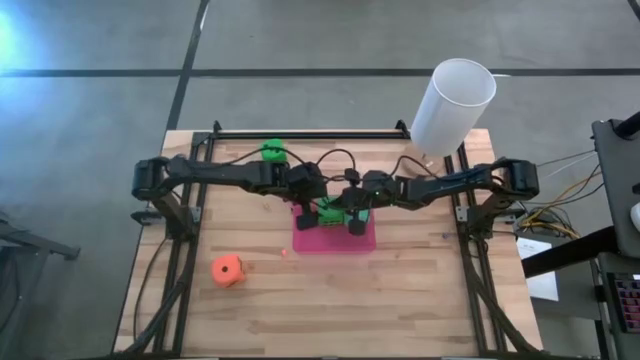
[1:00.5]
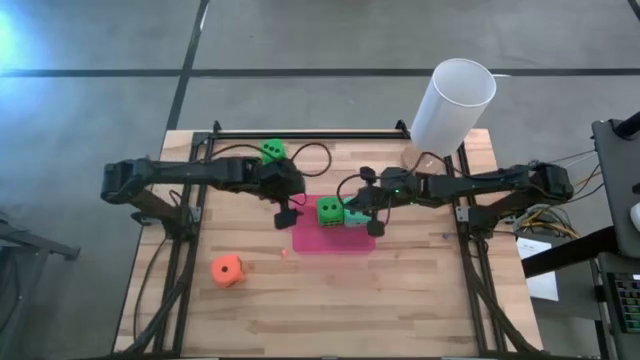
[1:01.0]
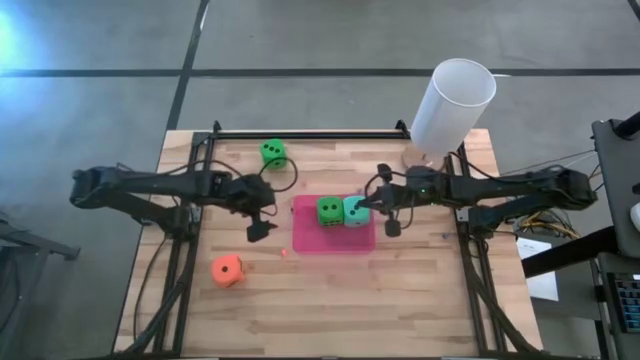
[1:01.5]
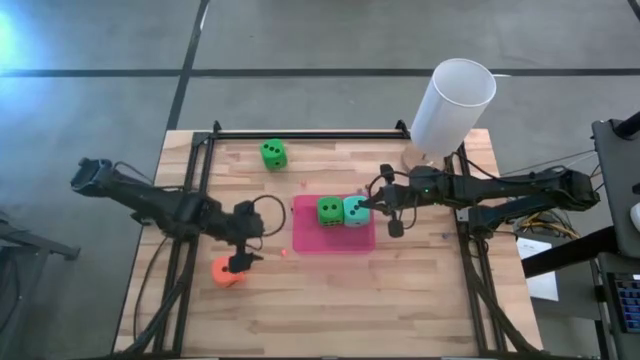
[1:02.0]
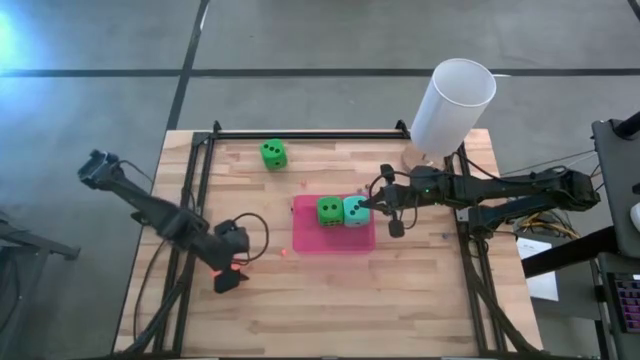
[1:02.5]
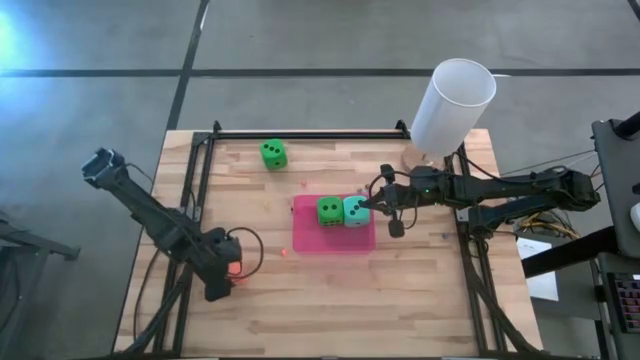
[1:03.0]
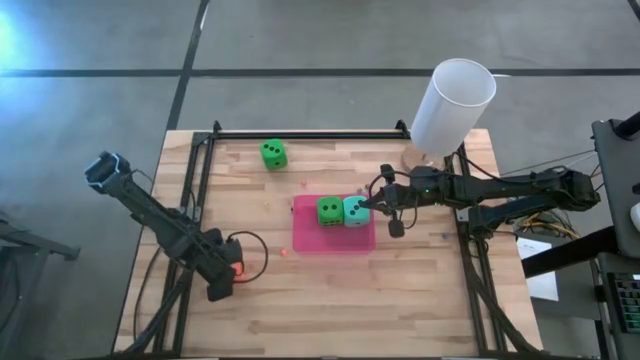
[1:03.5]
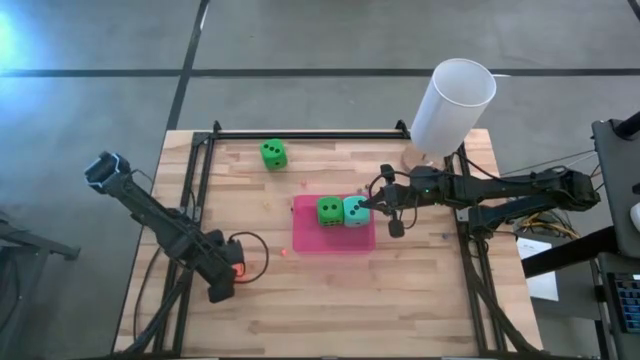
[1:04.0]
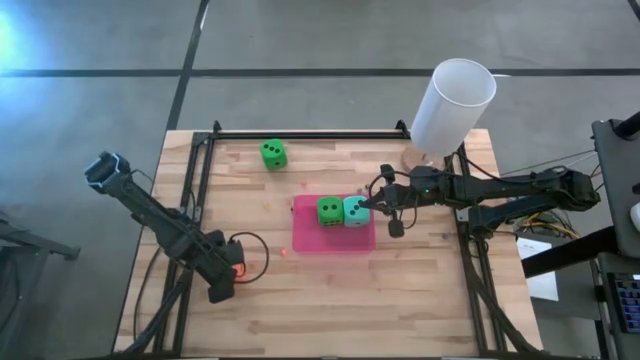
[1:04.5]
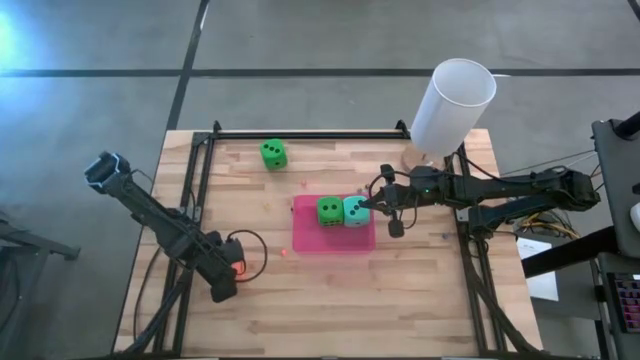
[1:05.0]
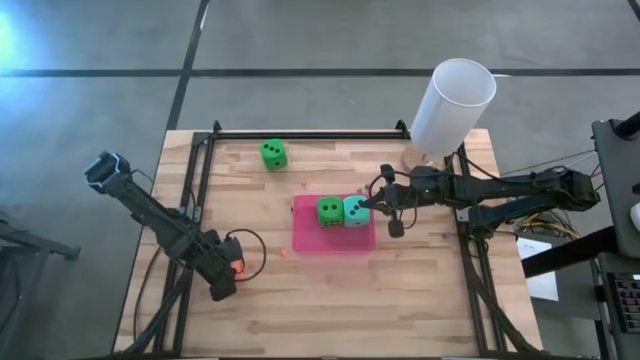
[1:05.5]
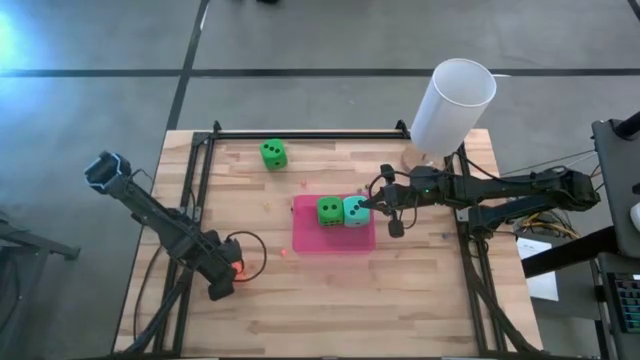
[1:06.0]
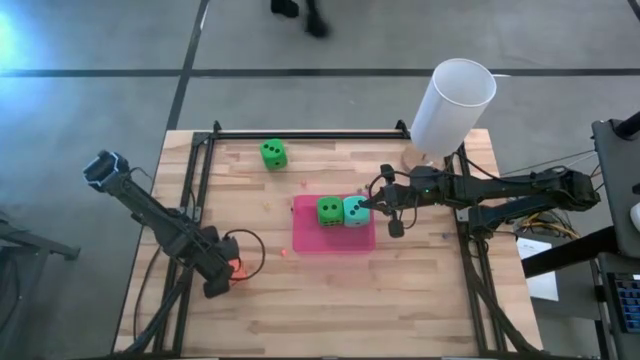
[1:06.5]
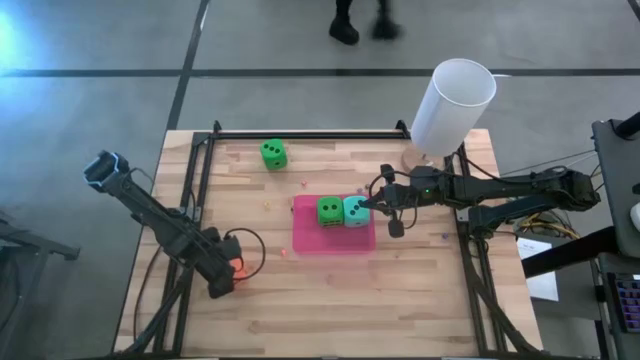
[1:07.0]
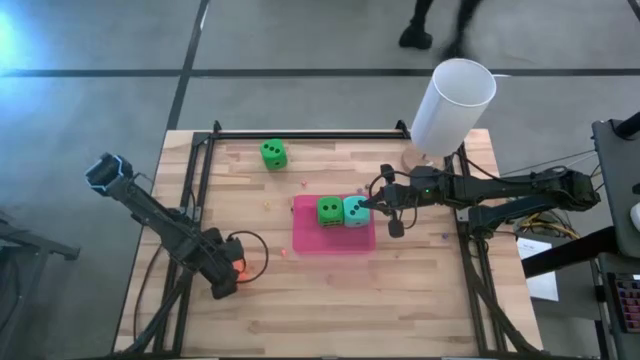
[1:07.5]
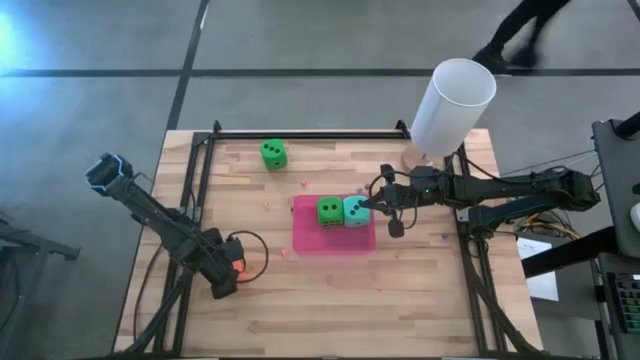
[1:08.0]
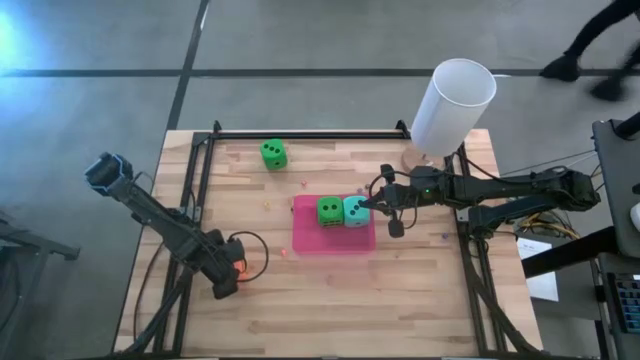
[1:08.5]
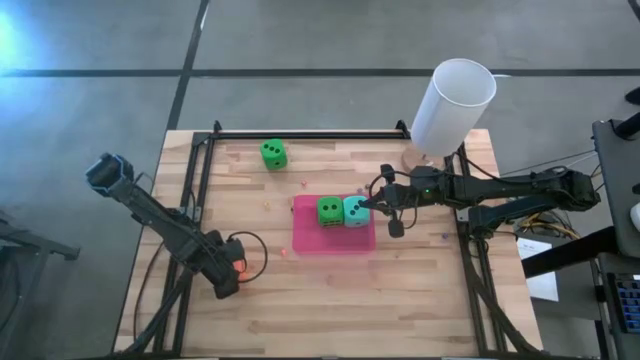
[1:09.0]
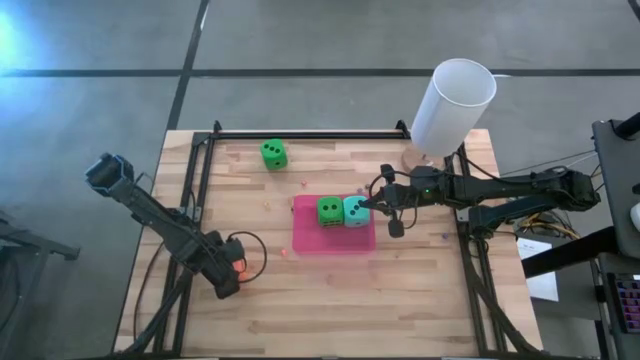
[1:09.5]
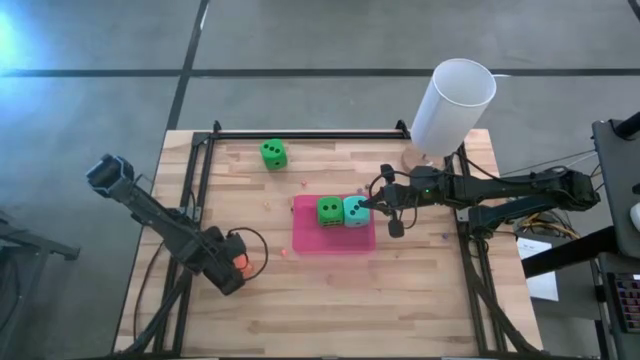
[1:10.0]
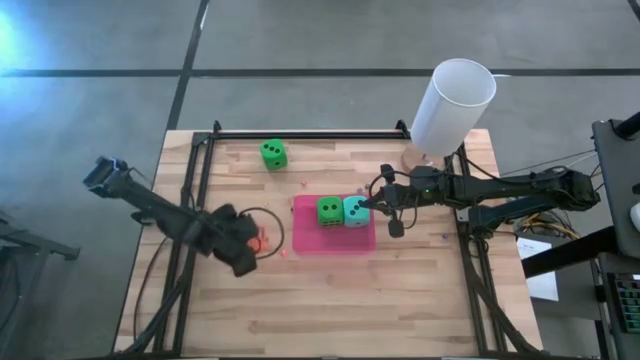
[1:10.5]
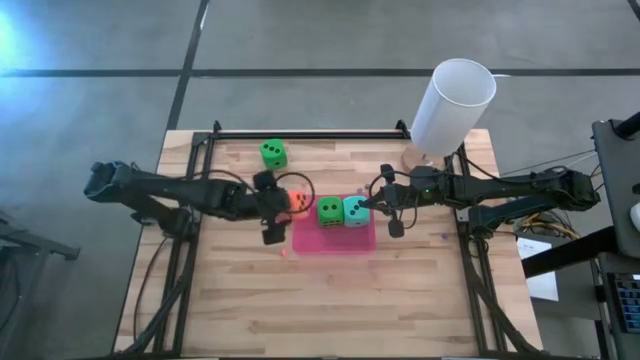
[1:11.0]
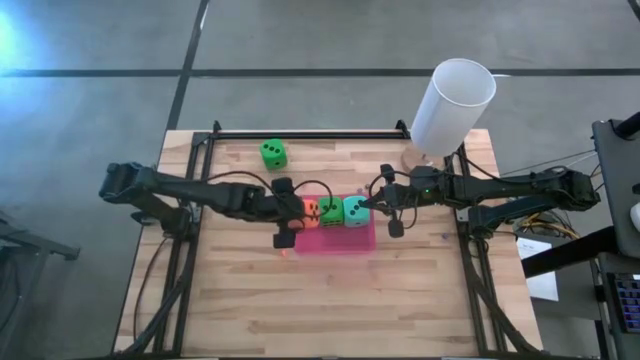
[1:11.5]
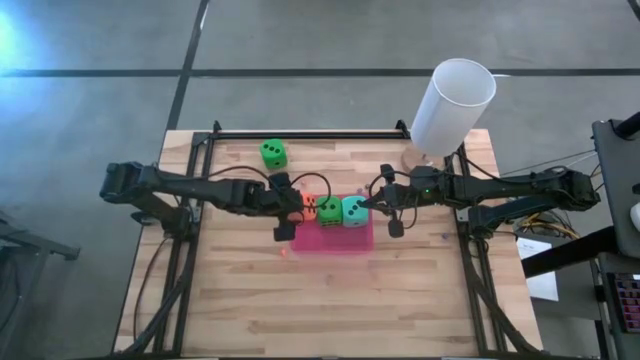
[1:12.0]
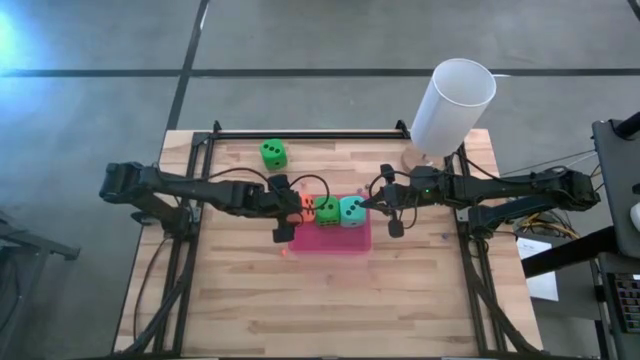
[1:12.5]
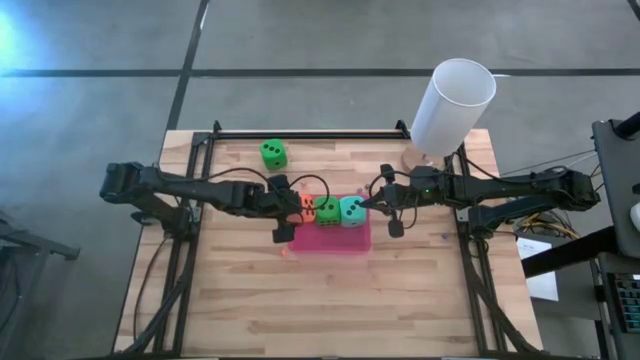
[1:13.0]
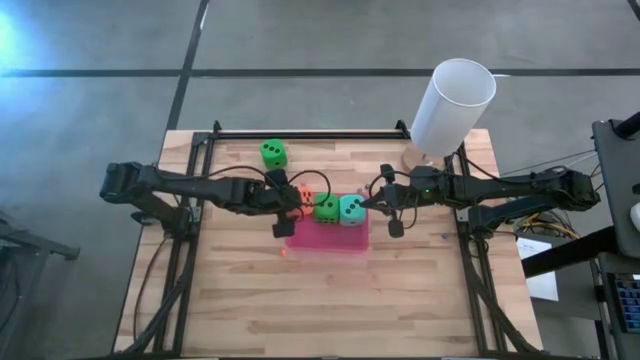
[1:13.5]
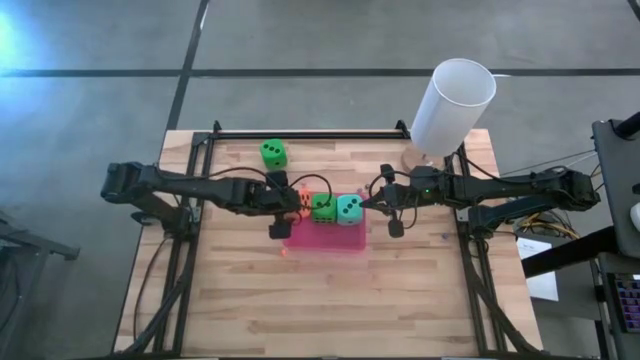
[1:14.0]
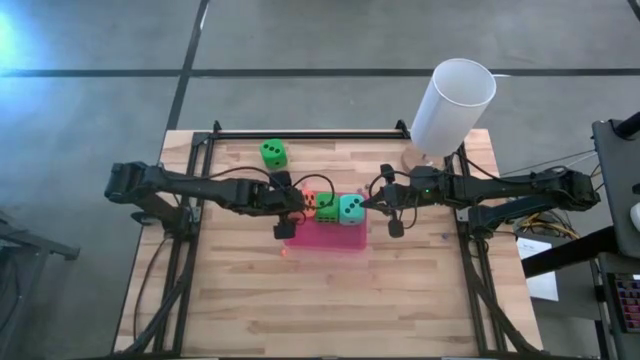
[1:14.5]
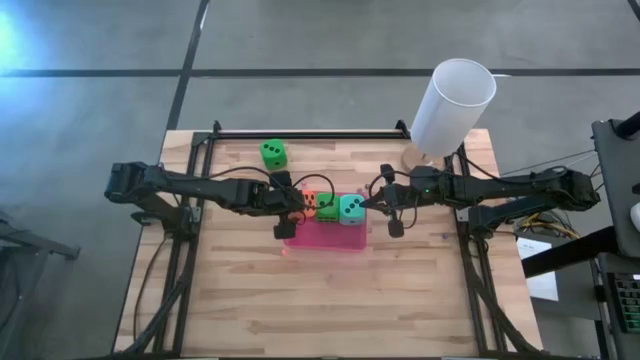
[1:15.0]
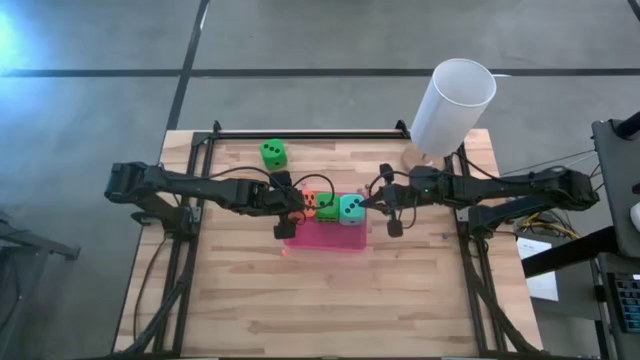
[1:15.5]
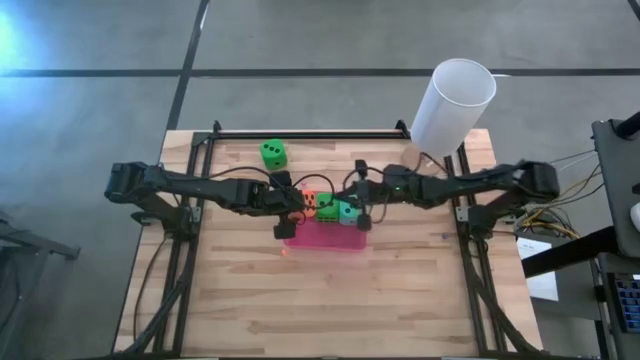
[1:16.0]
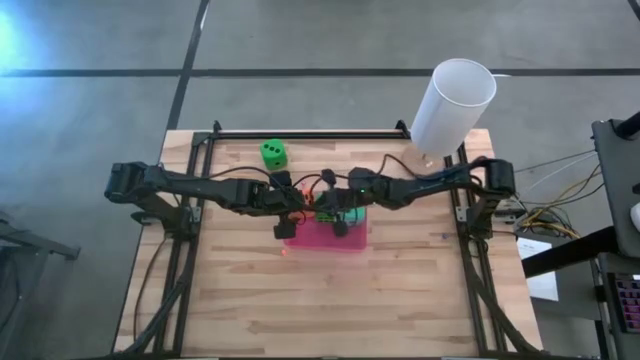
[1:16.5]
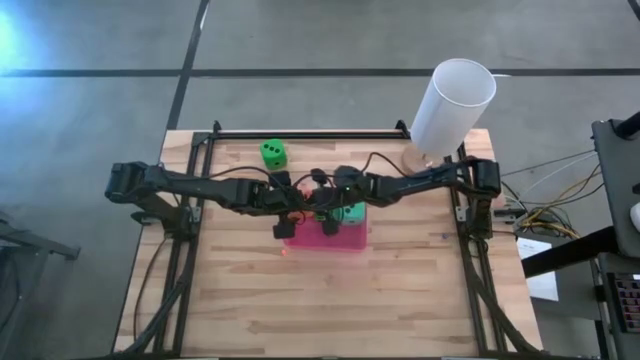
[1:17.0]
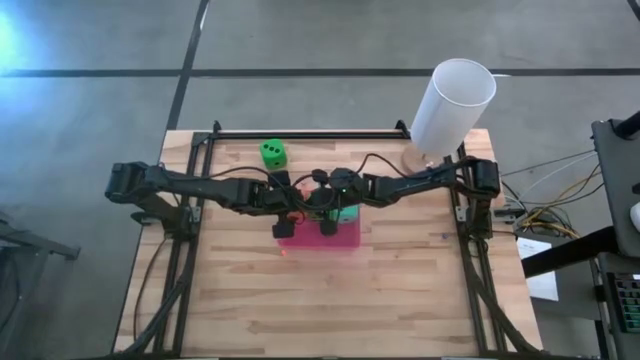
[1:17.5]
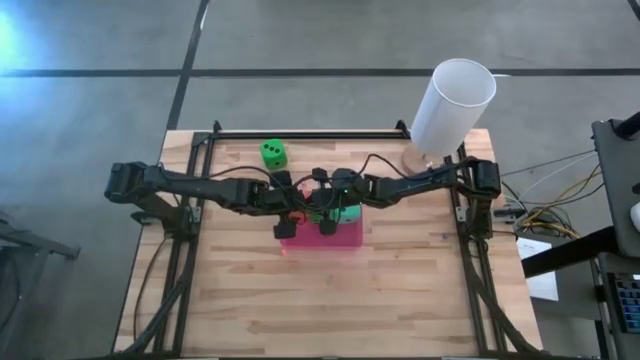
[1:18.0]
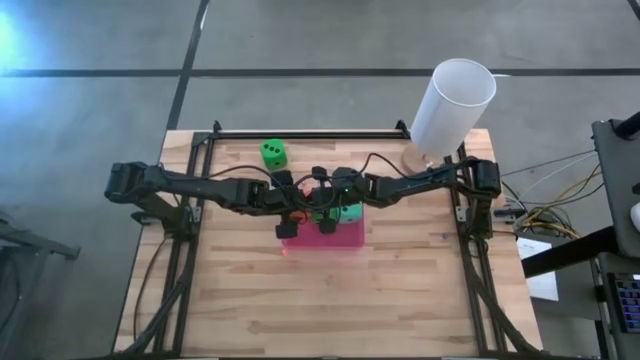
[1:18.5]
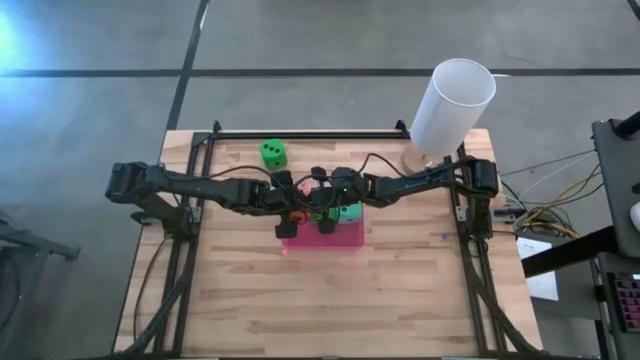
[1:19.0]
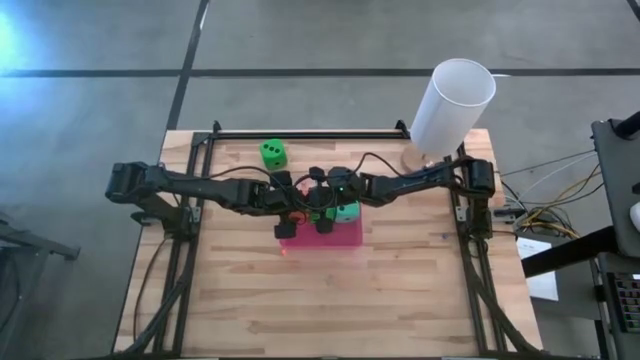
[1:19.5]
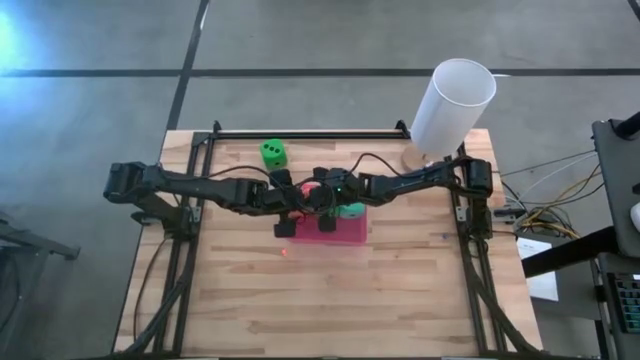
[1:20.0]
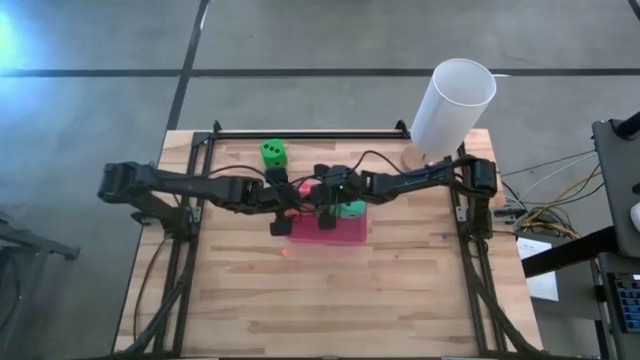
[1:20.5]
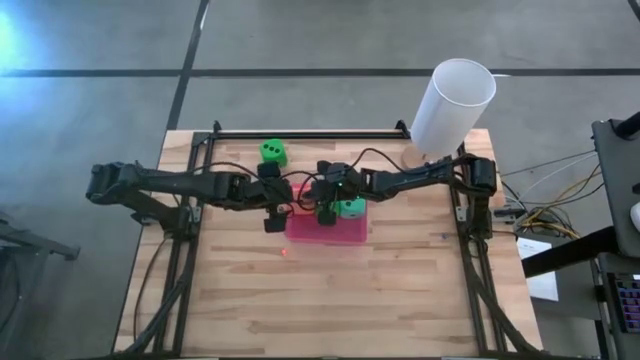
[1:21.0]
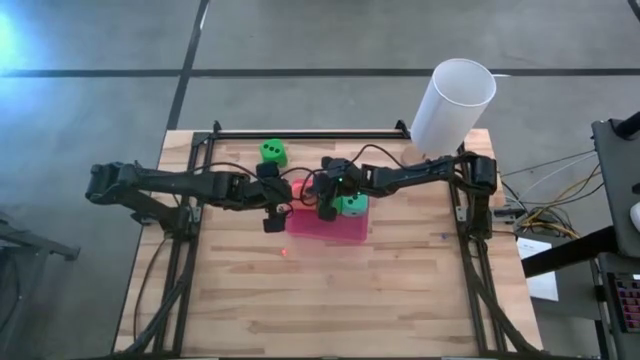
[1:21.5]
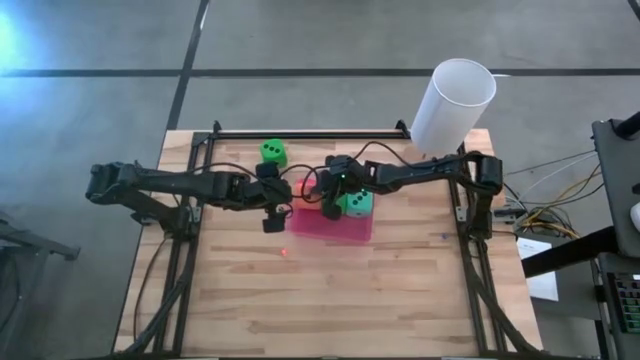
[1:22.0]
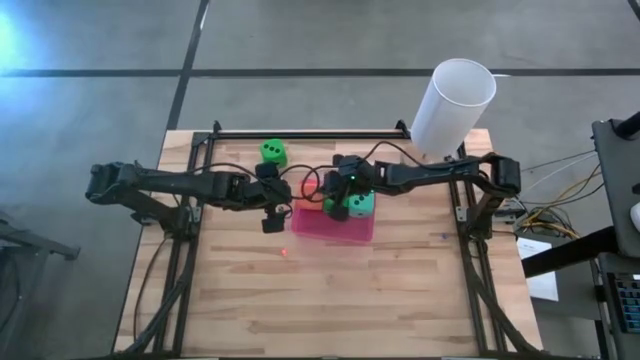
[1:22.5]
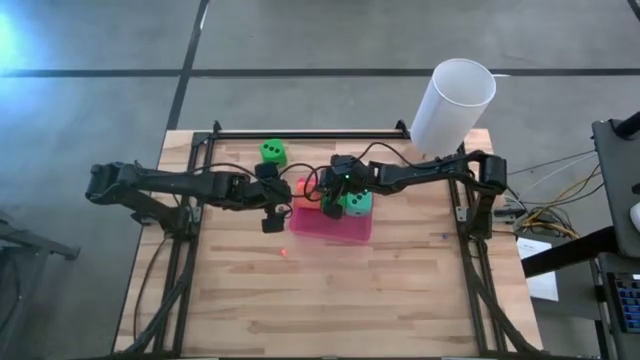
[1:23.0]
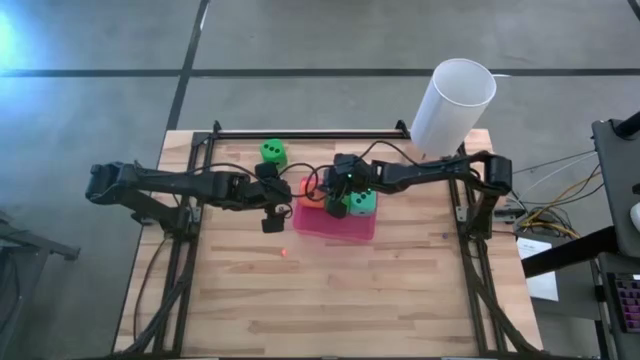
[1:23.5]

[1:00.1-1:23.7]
Task: Pick & Place Dice
Put the large die into the pink bin
